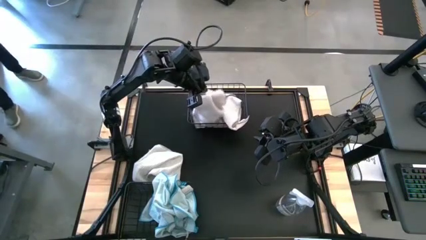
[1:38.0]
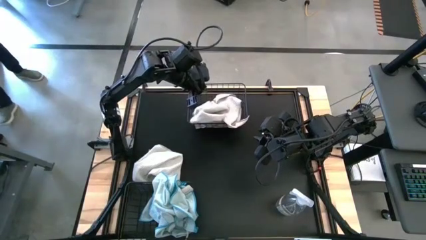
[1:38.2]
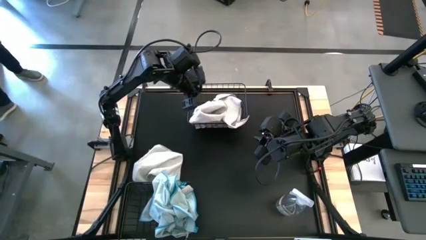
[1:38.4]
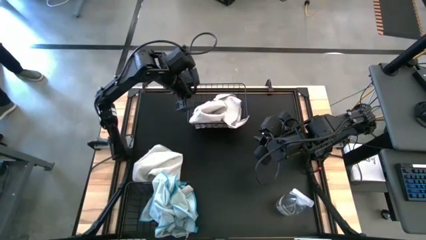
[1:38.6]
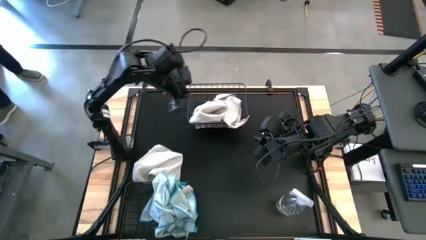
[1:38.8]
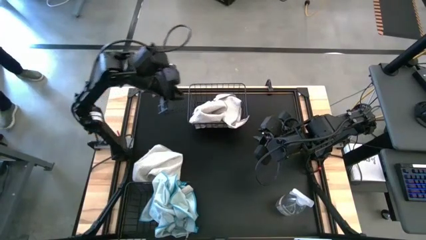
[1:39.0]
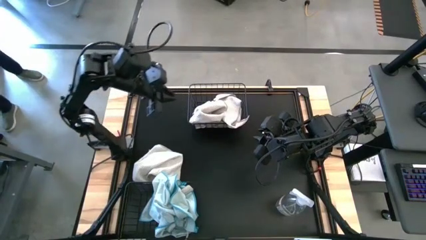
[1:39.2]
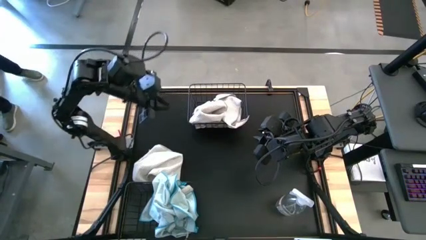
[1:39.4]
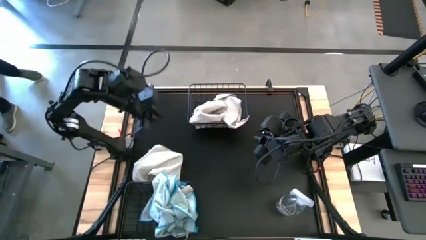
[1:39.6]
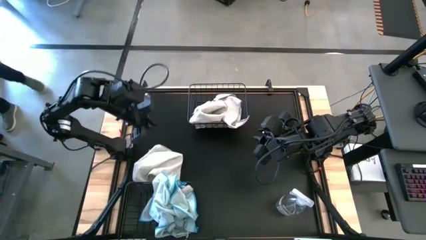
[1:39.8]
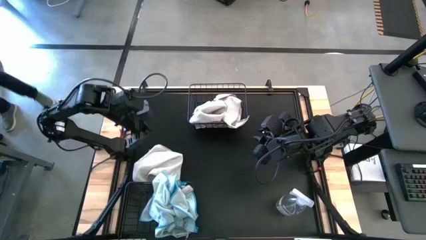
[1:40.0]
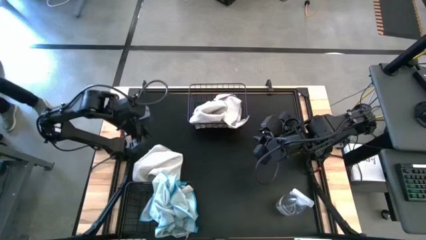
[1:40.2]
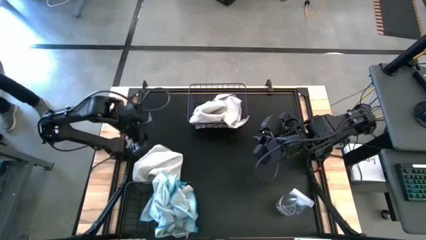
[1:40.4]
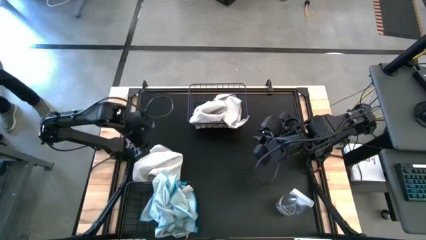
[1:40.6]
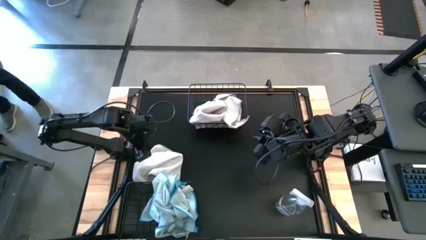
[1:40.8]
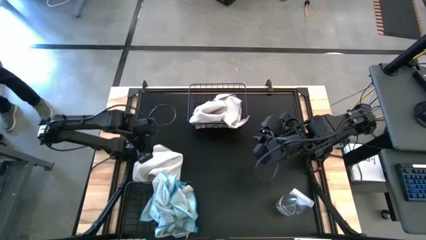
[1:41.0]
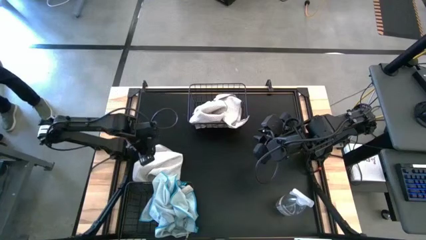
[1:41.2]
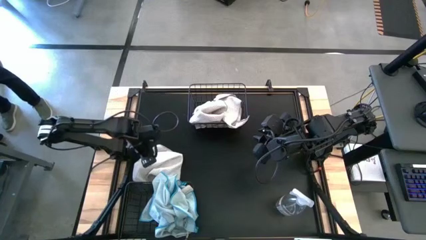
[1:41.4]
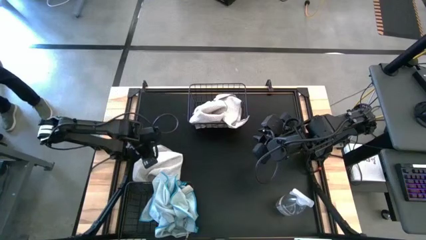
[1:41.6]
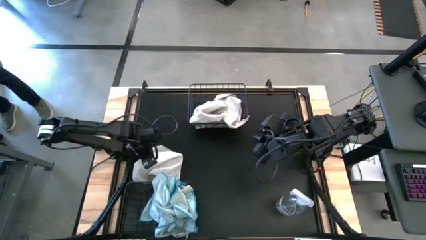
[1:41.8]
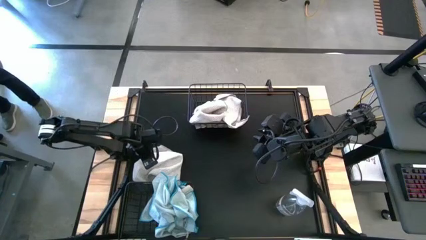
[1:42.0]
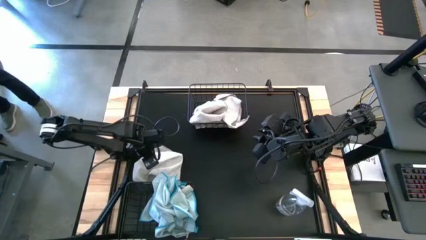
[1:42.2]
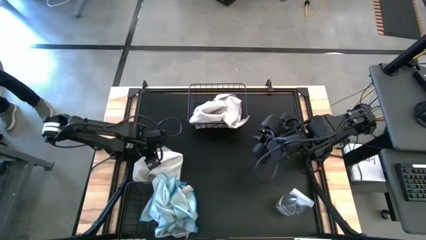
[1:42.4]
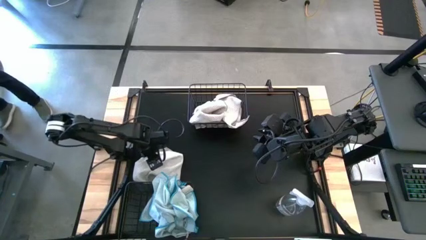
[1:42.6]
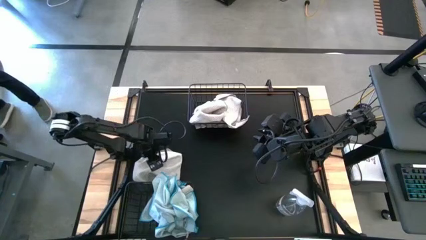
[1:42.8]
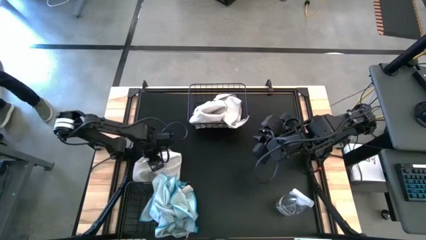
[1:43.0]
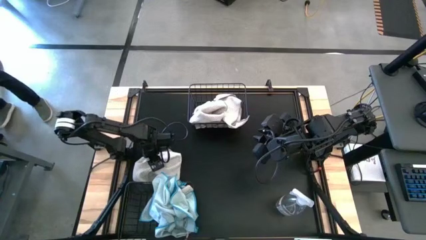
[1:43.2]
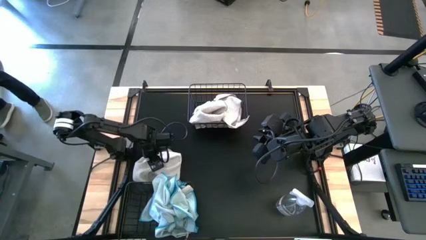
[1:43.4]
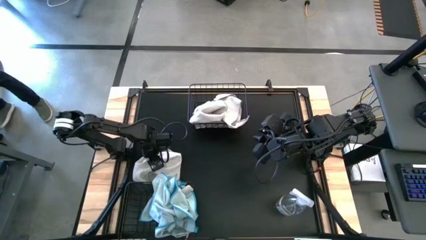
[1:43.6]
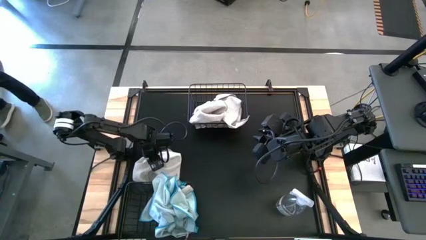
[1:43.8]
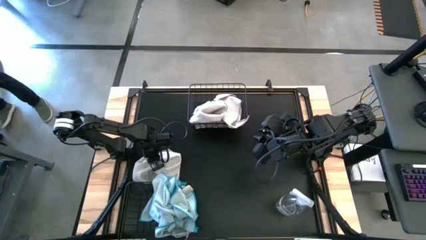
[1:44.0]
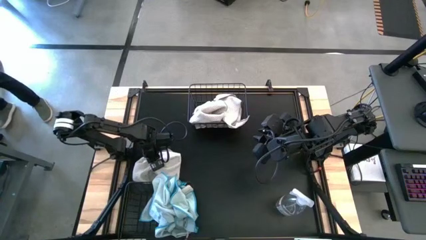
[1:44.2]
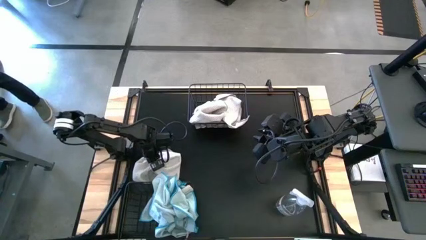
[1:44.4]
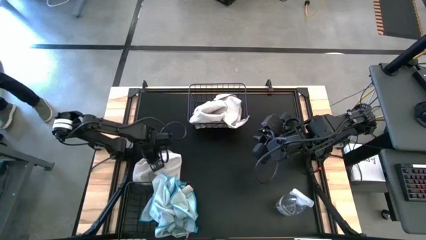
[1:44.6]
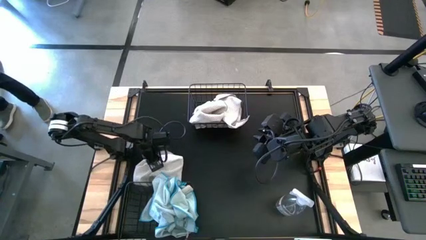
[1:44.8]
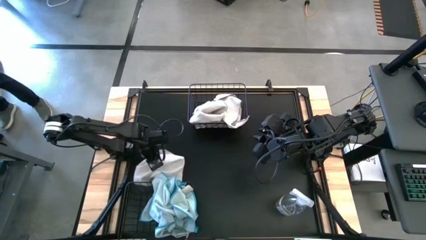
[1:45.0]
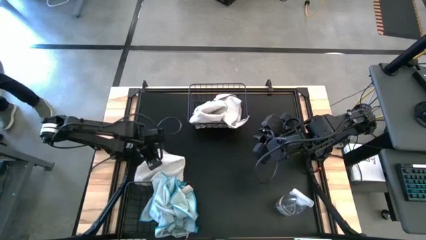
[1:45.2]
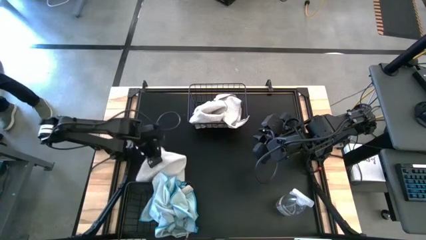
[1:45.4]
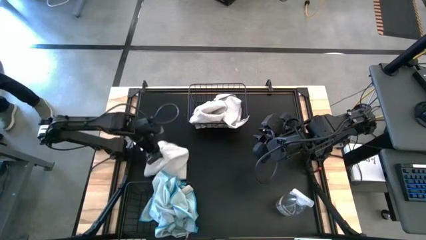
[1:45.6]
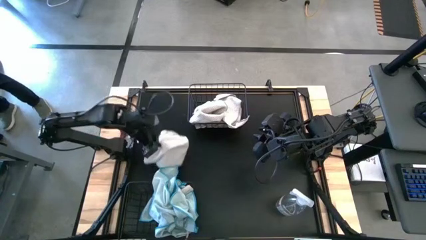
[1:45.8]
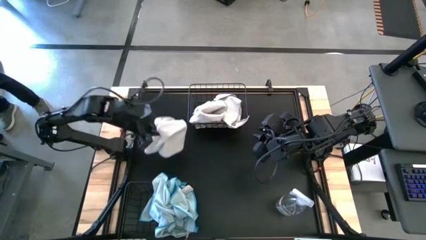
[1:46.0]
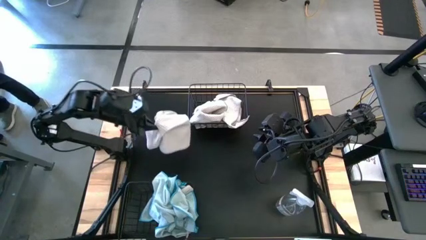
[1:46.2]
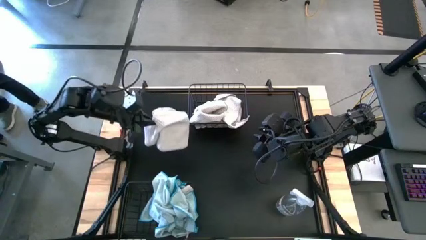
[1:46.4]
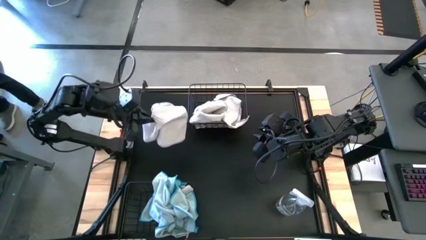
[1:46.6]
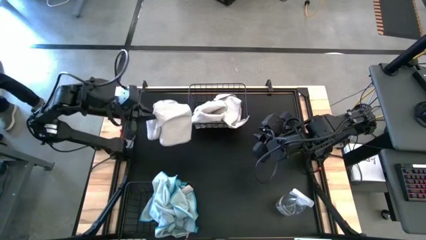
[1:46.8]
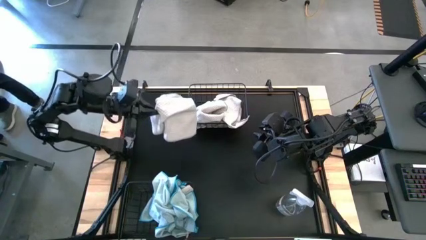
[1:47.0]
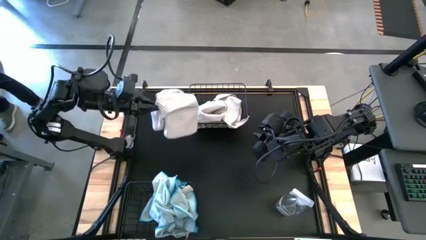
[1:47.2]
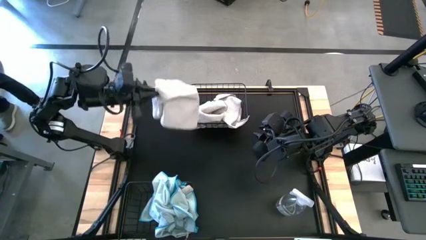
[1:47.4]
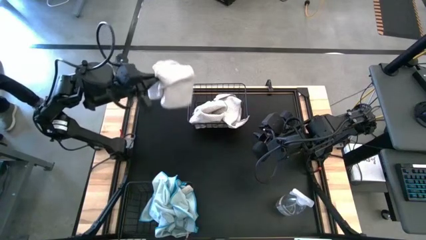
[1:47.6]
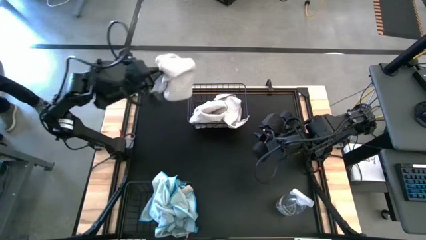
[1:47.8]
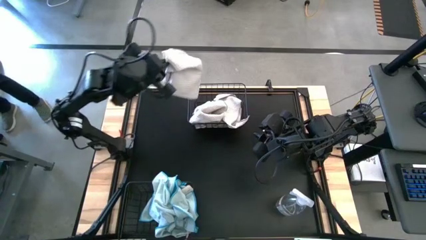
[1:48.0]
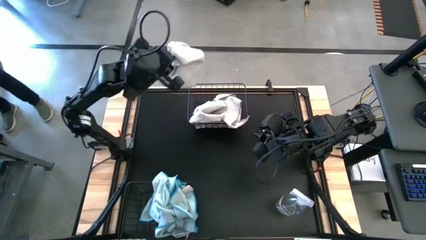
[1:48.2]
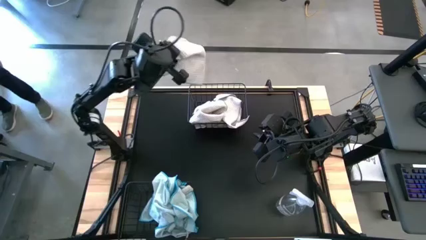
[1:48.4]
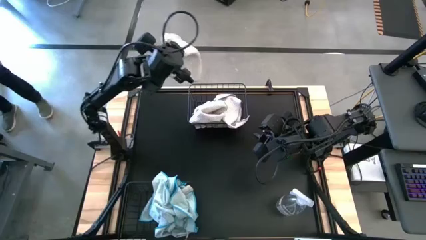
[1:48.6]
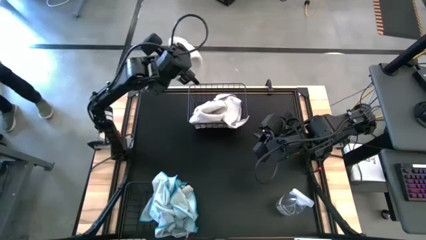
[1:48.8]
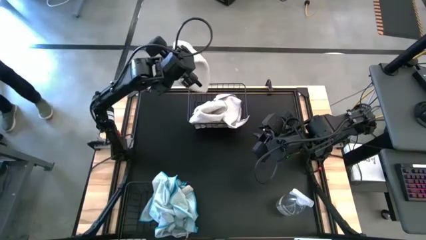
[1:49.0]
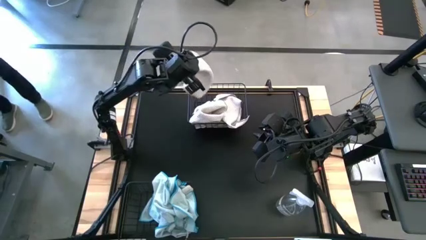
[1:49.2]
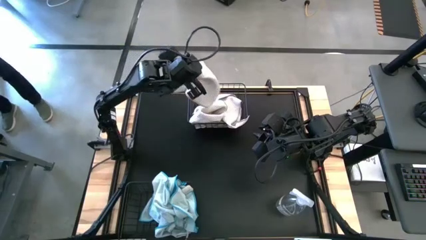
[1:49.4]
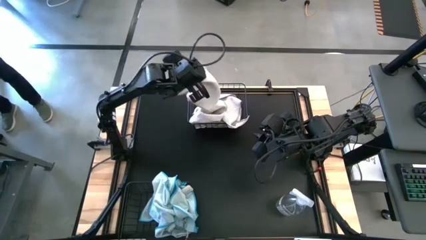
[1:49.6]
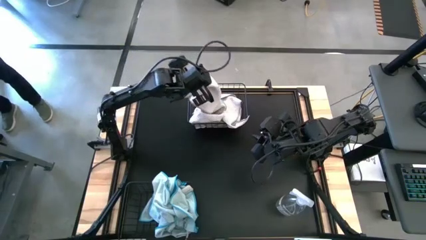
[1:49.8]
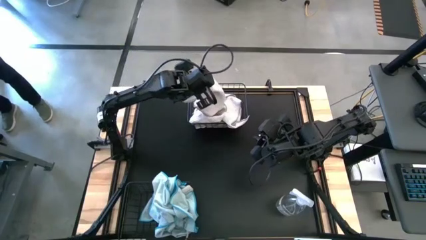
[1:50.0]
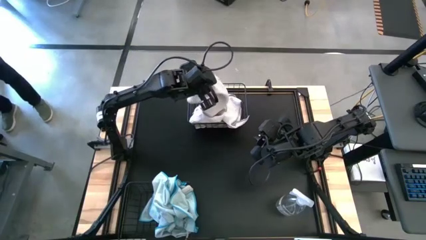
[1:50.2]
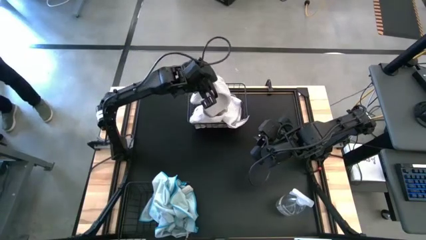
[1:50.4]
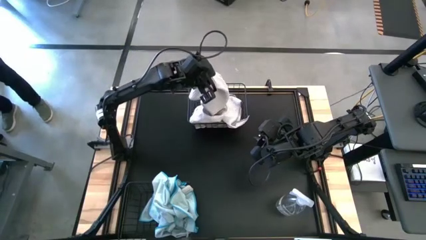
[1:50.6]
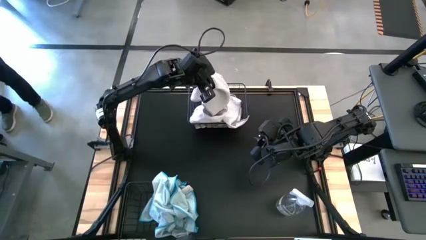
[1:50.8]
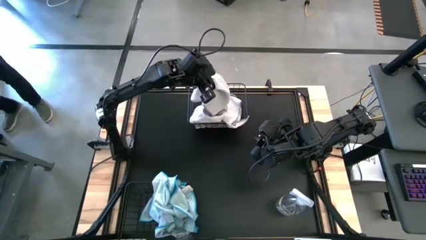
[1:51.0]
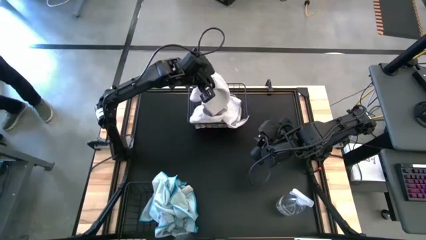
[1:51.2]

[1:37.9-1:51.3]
Task: Sort microfiber towel by color & place in baskets
Put the white microfiber cloth into the top wire basket
